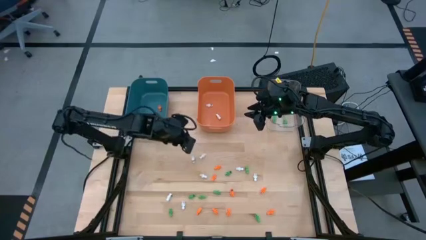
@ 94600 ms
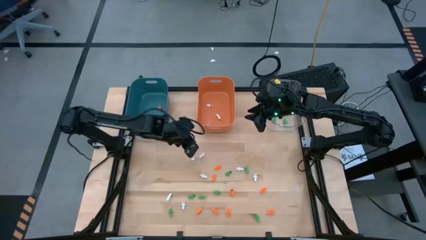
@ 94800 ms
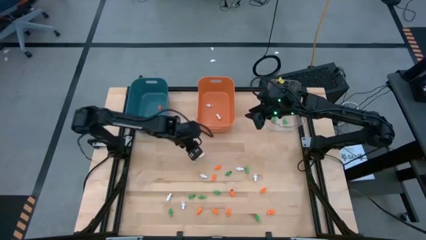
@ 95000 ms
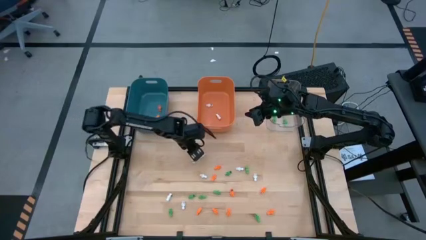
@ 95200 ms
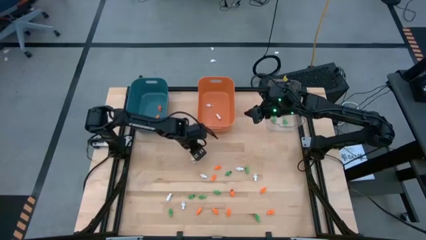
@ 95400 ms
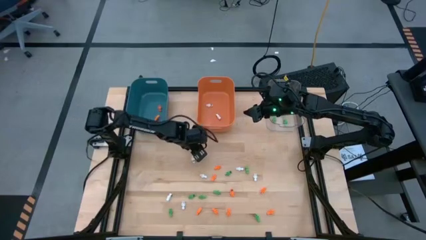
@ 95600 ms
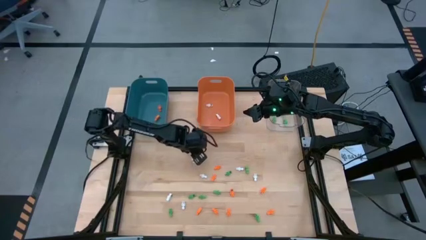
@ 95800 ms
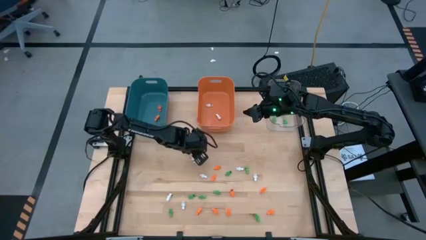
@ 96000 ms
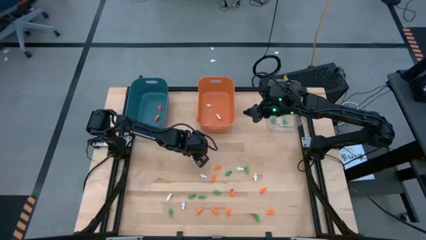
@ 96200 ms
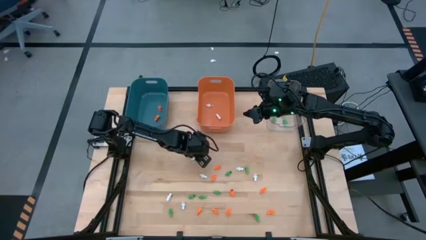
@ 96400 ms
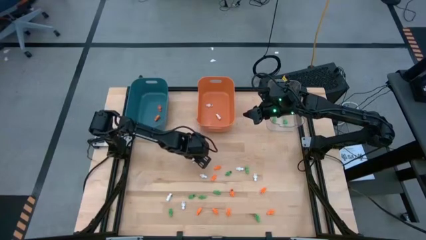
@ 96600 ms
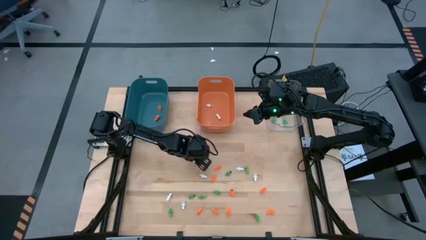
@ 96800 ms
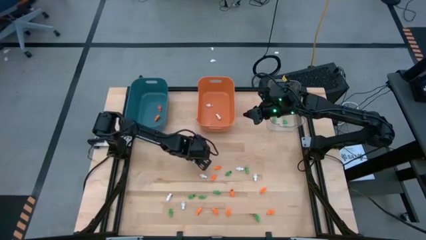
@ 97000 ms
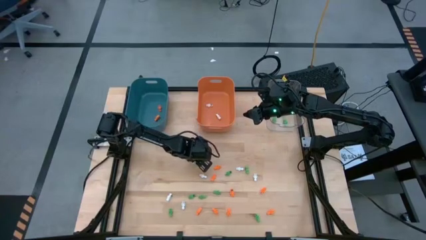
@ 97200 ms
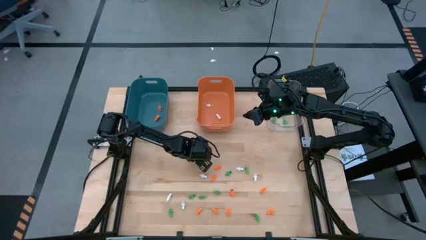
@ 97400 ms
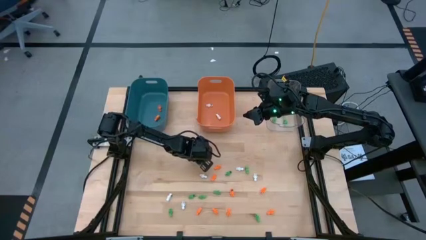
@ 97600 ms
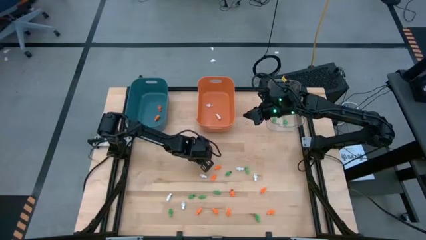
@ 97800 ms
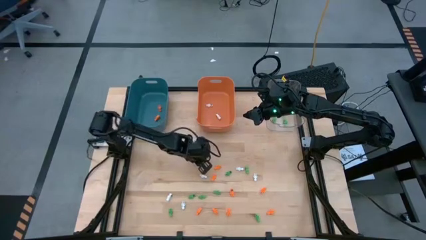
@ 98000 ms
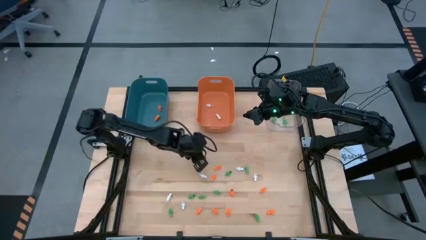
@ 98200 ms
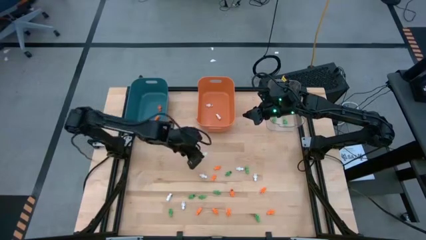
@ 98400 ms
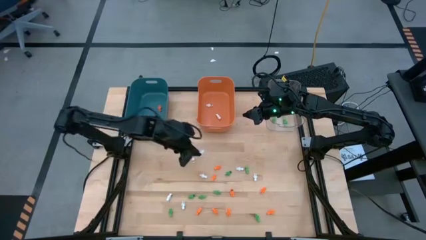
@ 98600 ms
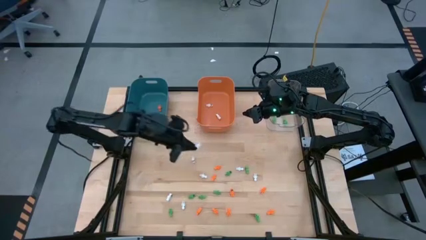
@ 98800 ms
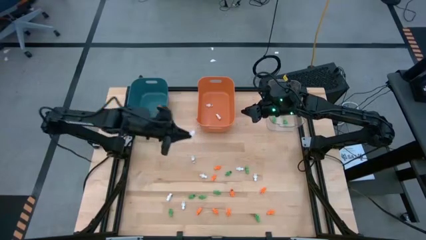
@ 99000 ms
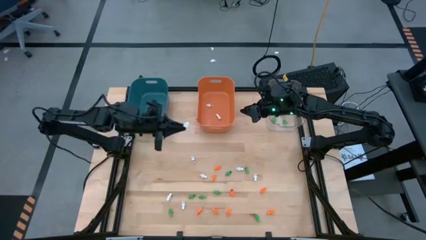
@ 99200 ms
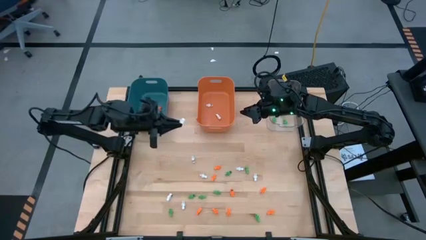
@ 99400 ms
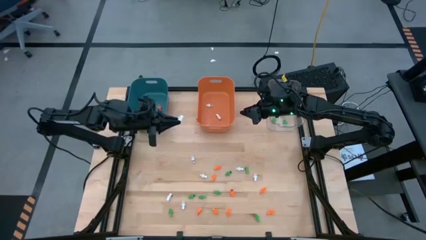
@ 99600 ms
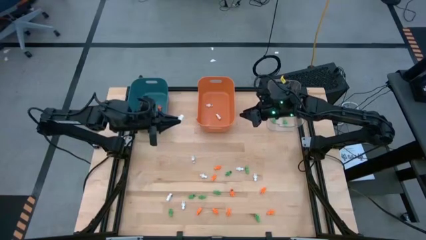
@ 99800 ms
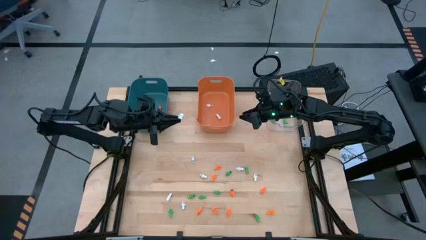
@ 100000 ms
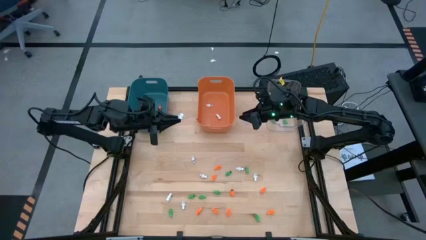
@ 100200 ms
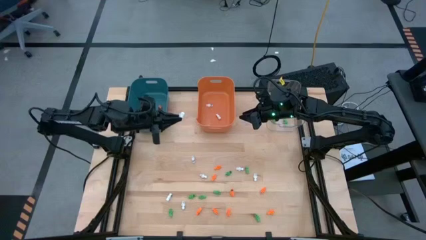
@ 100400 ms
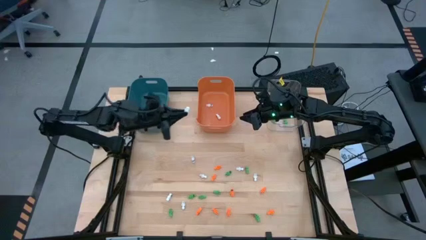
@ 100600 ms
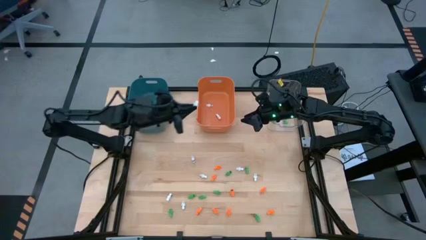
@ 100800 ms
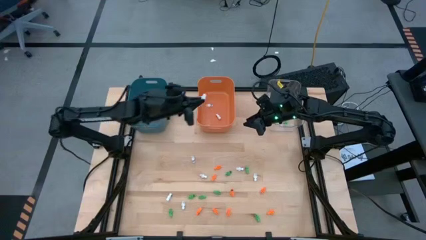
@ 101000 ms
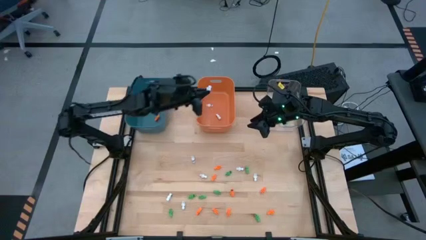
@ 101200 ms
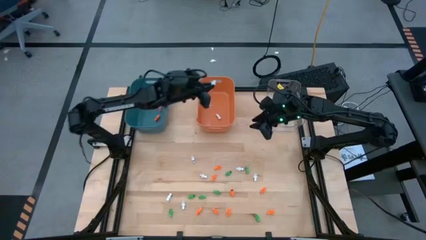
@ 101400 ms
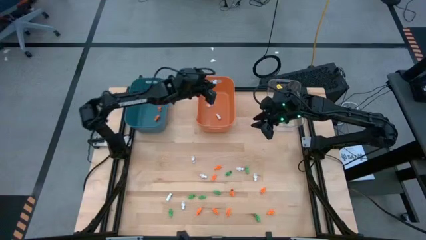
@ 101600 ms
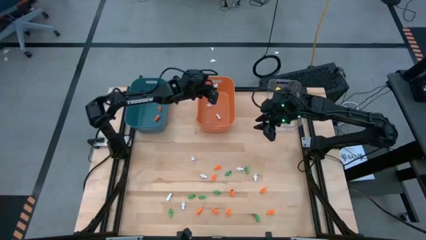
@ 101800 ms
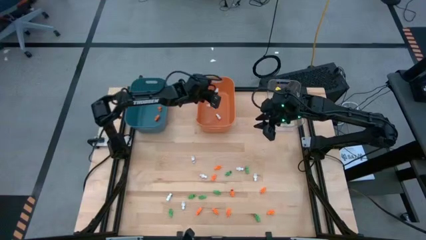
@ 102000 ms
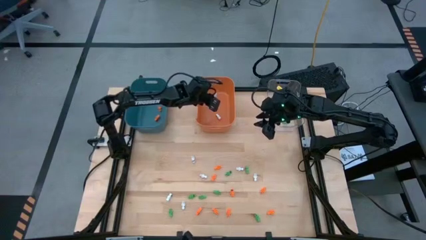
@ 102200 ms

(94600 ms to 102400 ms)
Task: Sort Halloween decoration
Put the white skeleton toy into the orange bin

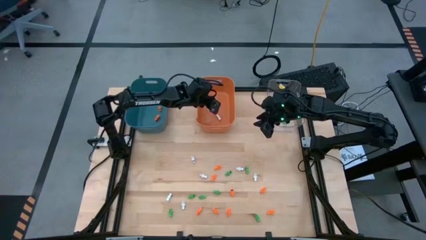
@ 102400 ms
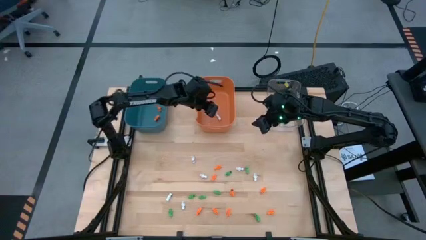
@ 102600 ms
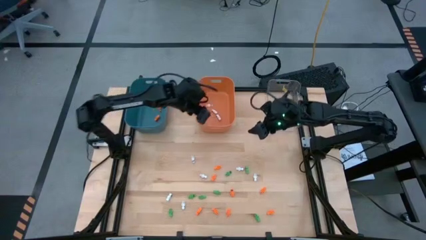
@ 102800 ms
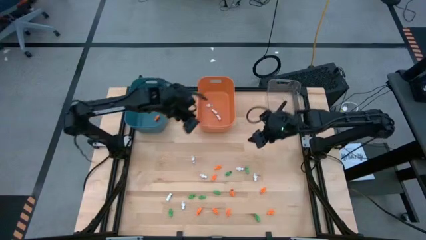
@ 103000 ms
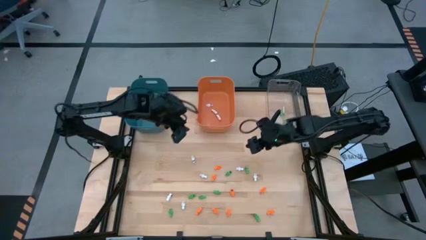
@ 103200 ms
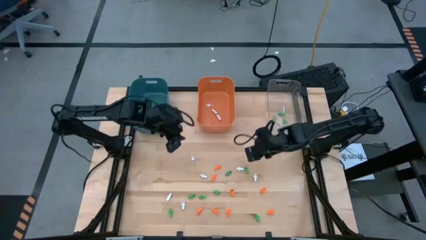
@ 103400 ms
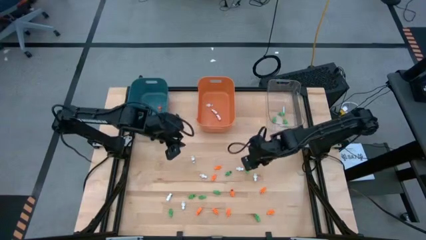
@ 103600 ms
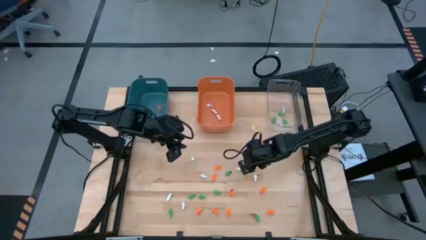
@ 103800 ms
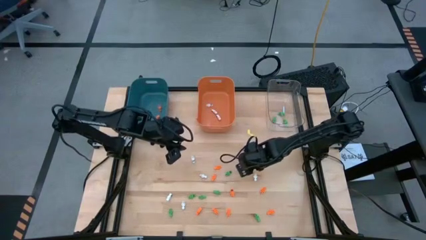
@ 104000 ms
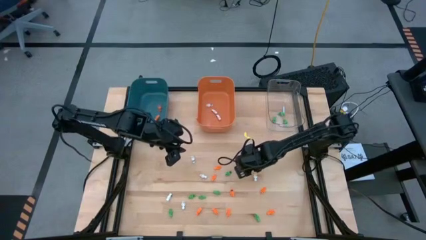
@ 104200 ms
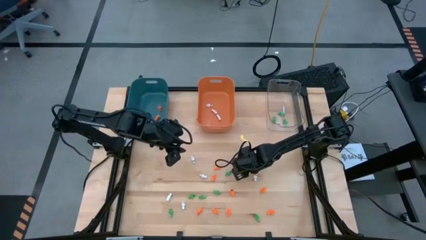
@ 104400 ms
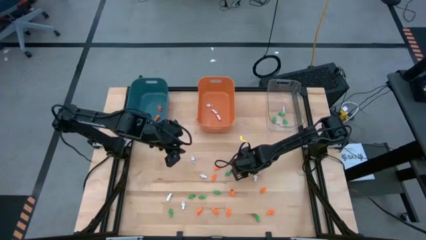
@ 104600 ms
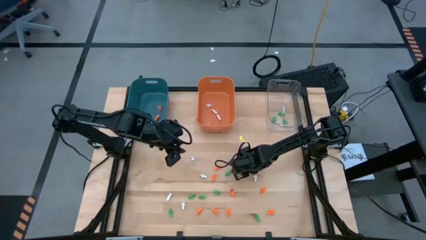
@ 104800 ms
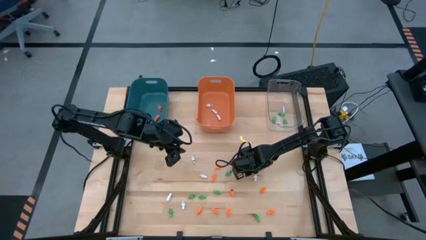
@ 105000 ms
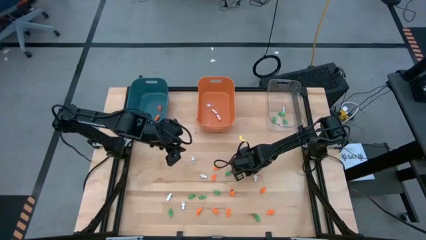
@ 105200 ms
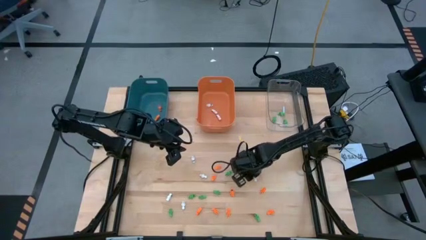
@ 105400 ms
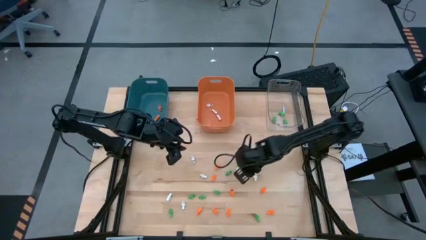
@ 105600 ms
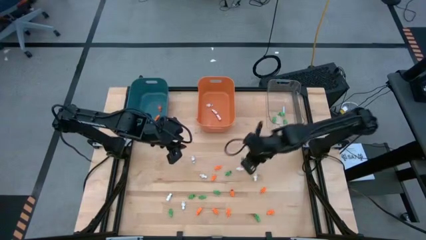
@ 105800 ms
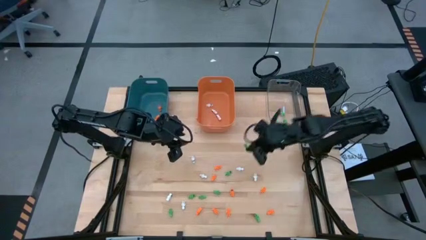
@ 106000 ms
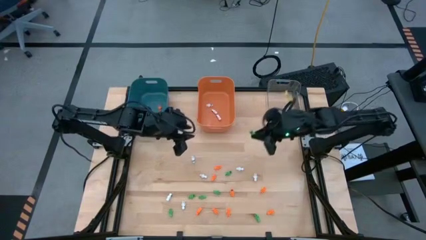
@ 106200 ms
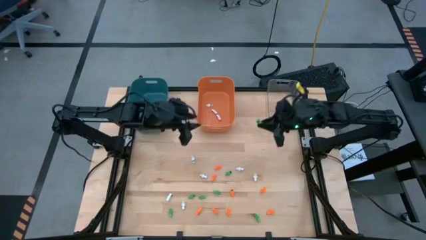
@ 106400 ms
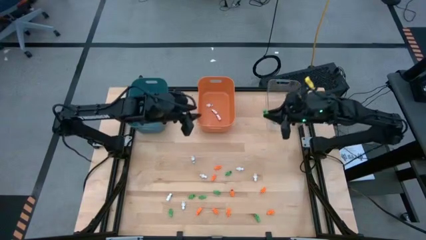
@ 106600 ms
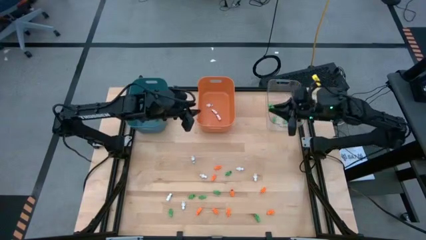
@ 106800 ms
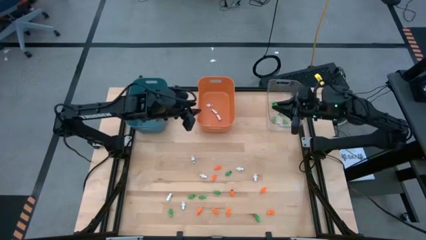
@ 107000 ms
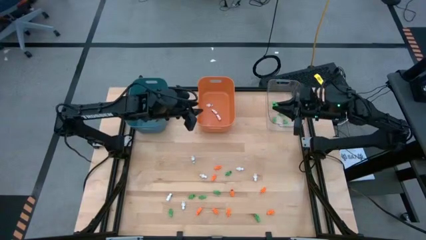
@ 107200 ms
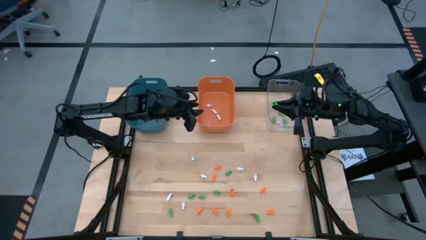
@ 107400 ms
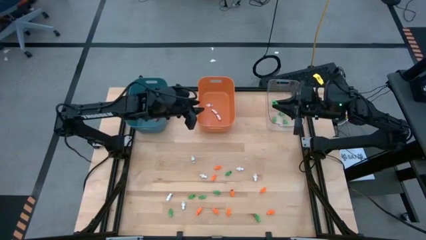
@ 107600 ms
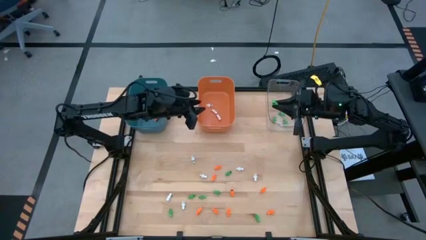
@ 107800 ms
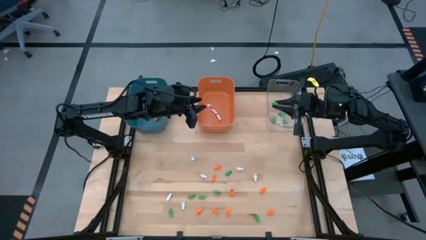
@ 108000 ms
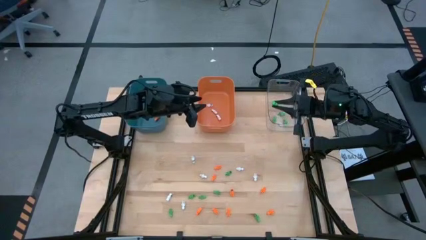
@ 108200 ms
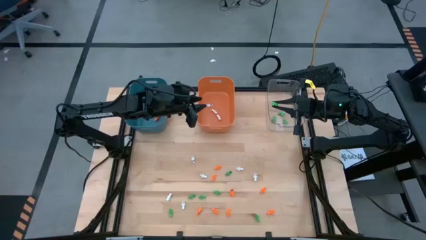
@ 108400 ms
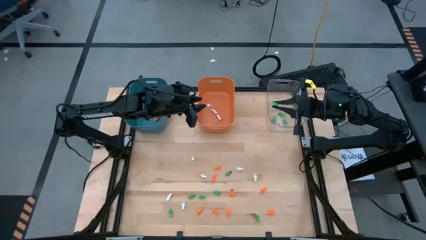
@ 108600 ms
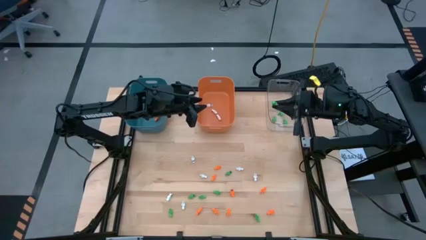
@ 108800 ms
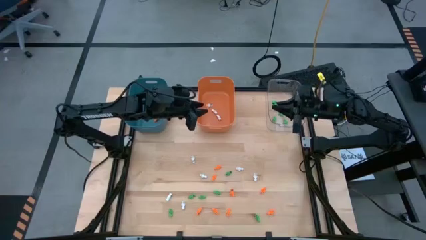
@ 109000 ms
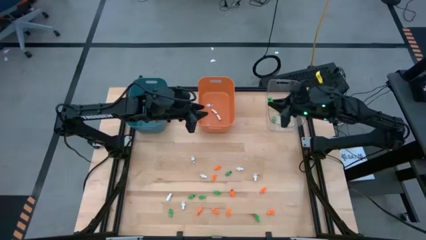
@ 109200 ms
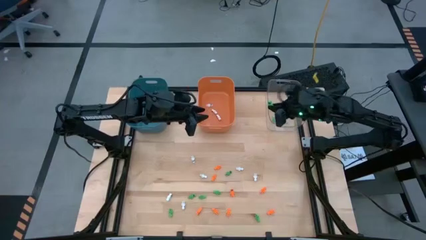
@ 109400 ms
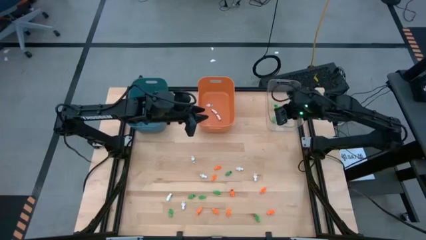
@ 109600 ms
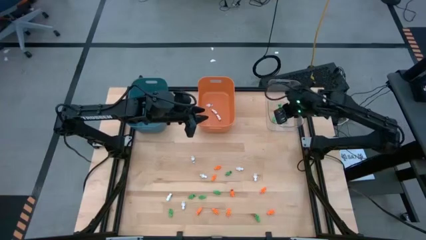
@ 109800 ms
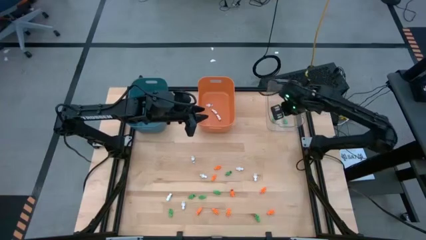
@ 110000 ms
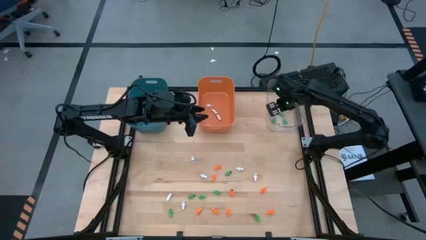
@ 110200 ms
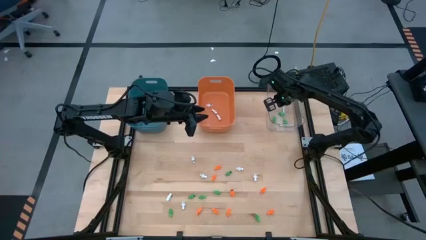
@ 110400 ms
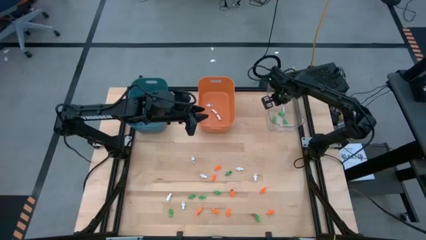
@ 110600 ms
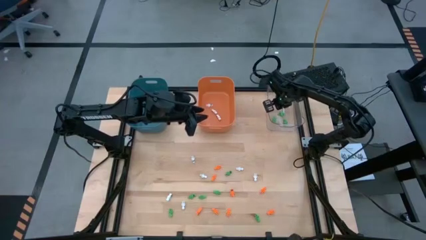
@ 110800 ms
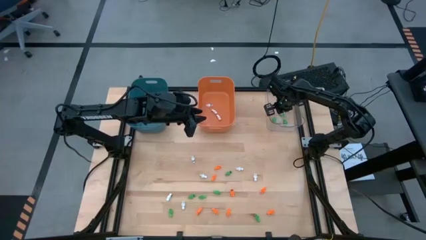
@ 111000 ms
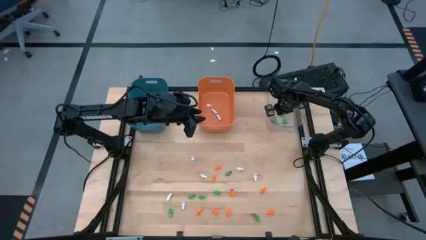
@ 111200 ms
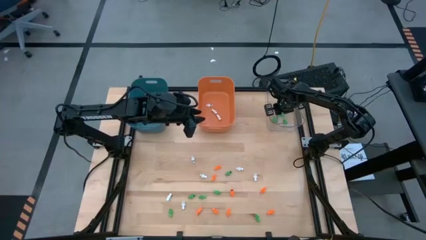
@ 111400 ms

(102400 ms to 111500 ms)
Put the green skeleton toy into the transparent bin
